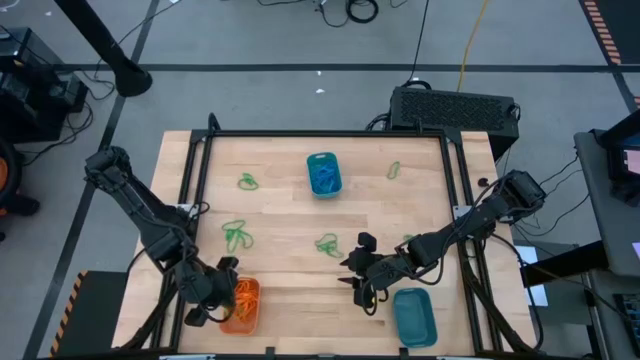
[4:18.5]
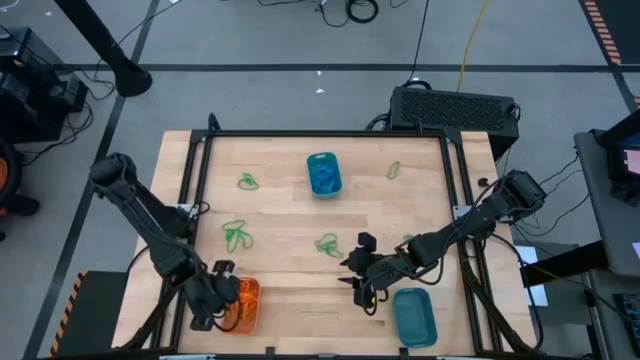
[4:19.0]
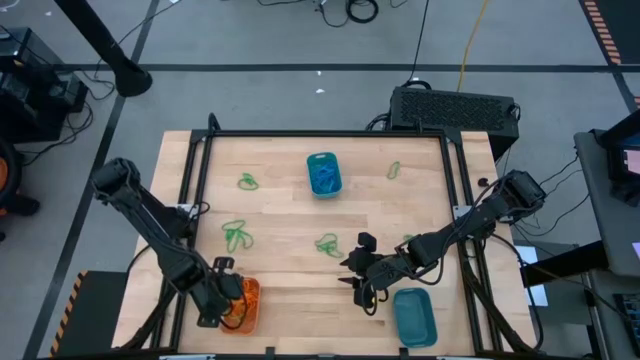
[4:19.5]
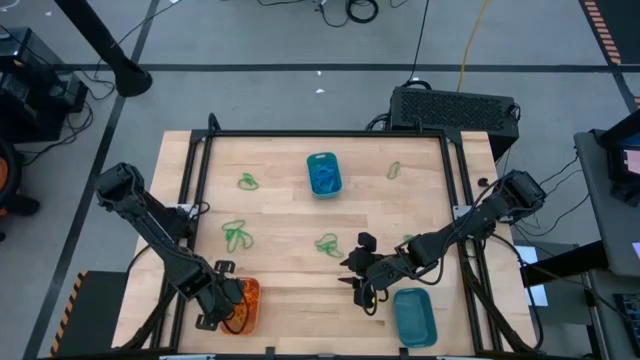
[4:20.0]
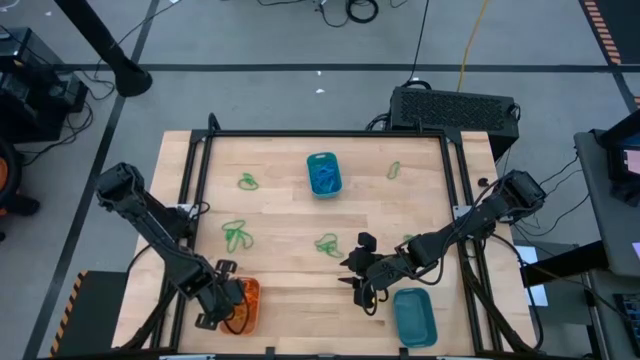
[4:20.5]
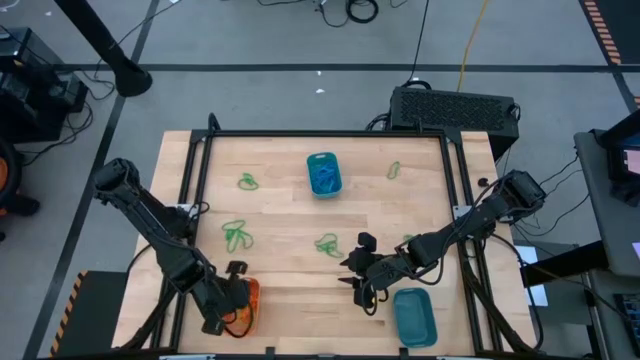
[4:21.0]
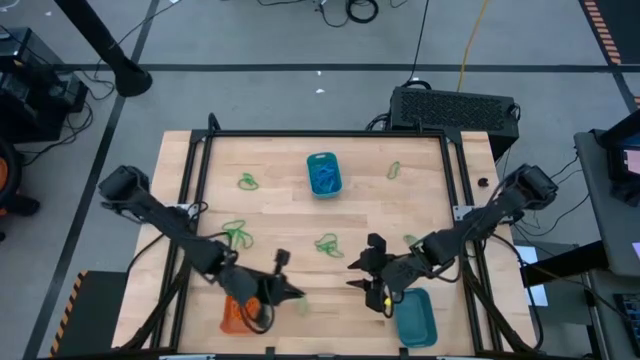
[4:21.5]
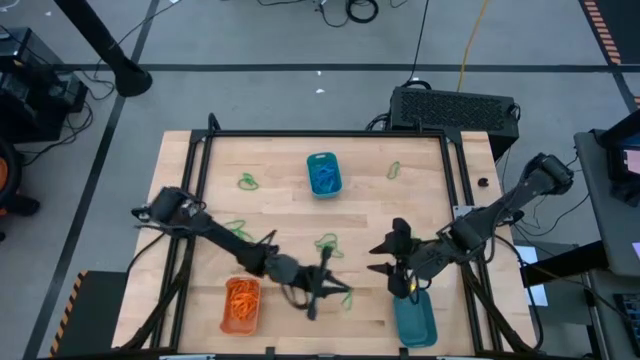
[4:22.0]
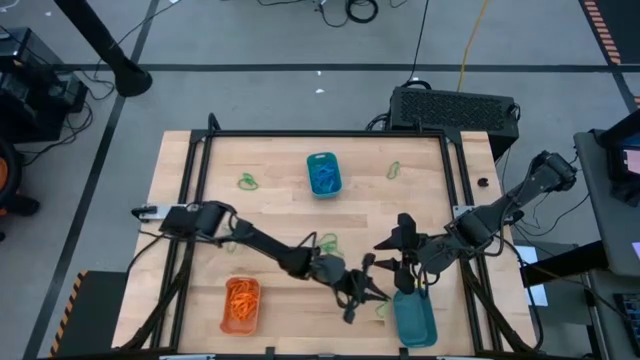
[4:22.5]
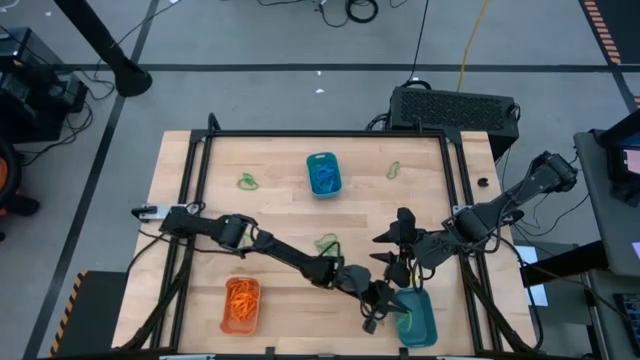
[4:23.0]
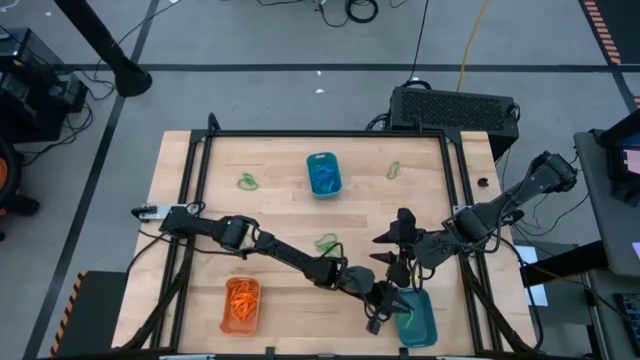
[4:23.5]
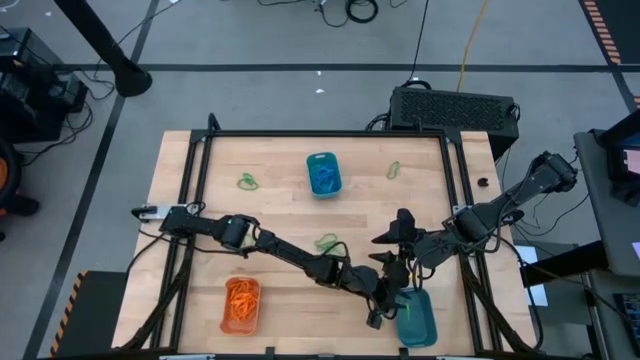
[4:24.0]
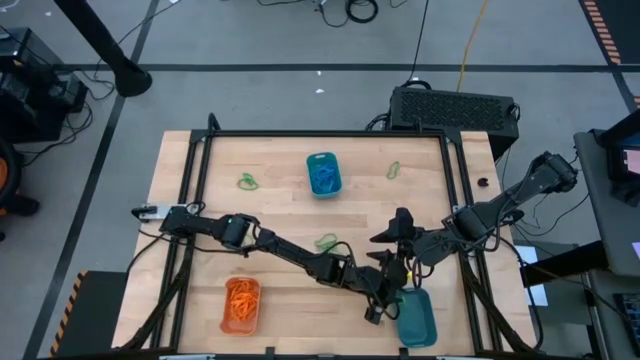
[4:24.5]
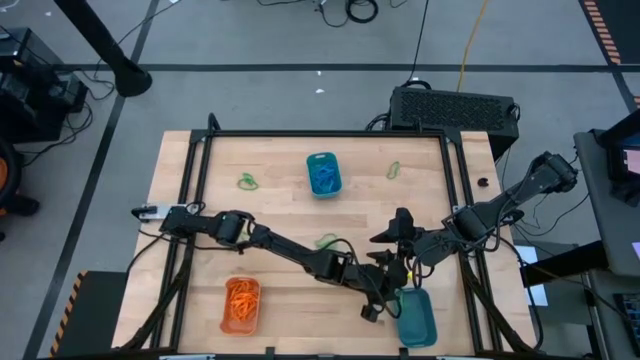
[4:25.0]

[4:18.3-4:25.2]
Task: Sort rubber bands into baskets
Move the green rubber band into the bottom bin

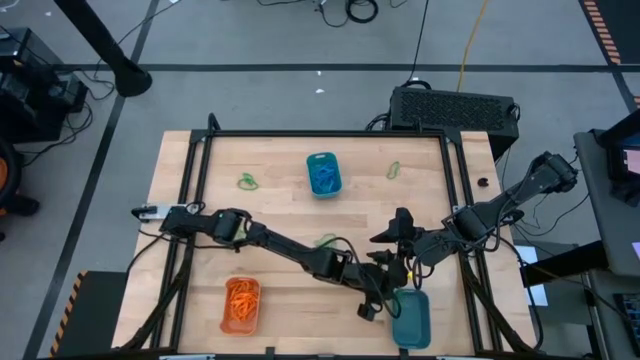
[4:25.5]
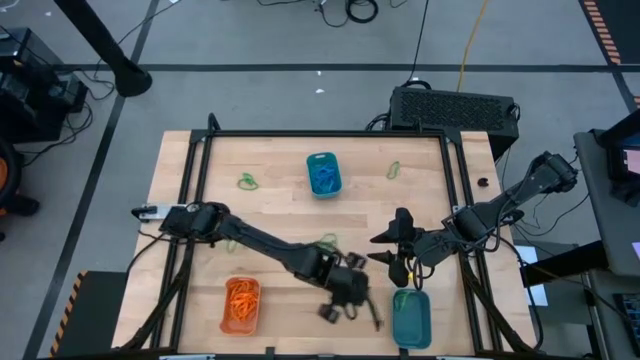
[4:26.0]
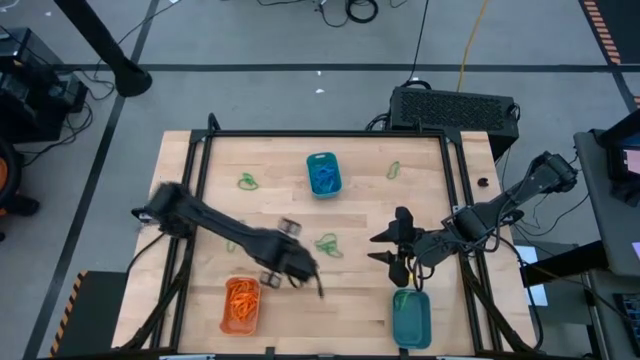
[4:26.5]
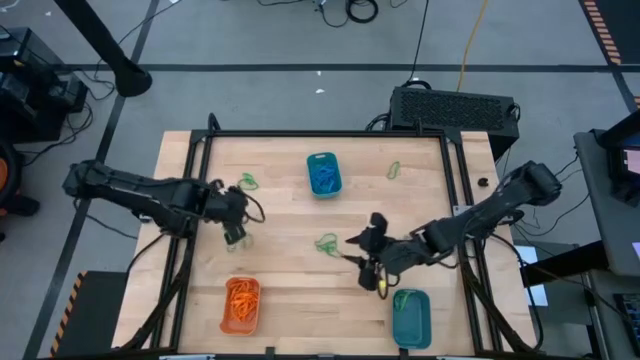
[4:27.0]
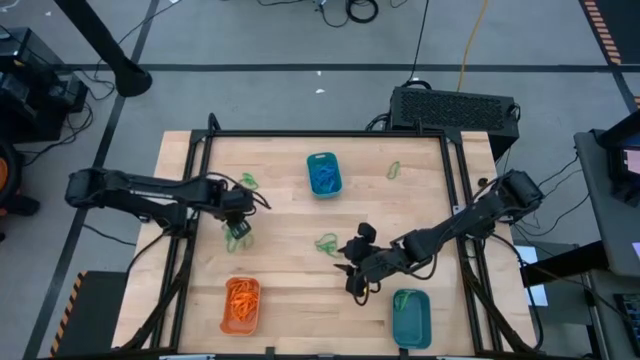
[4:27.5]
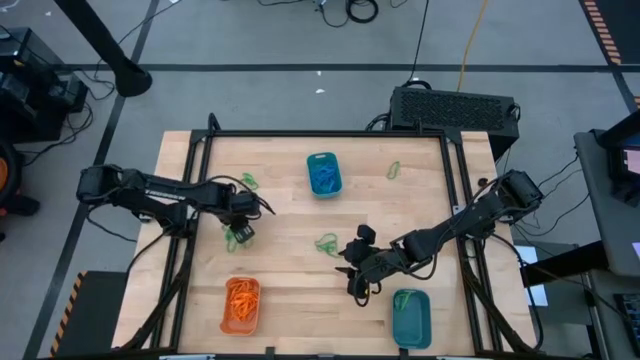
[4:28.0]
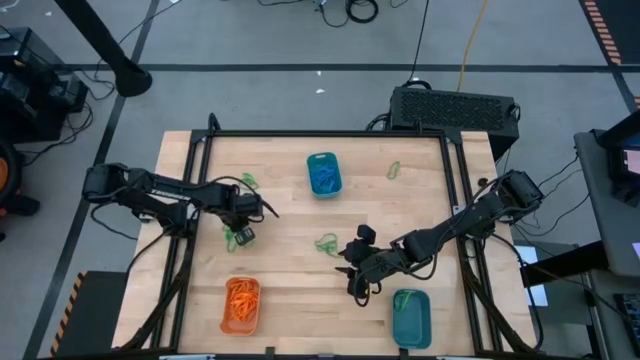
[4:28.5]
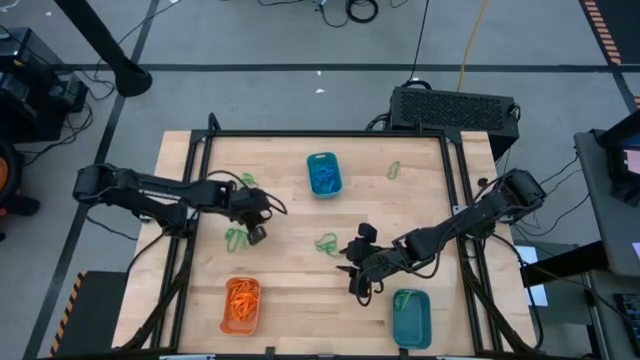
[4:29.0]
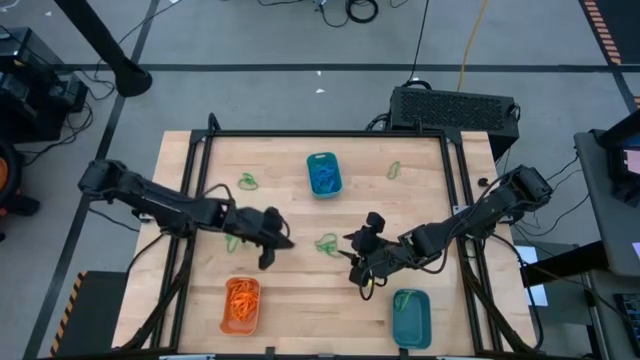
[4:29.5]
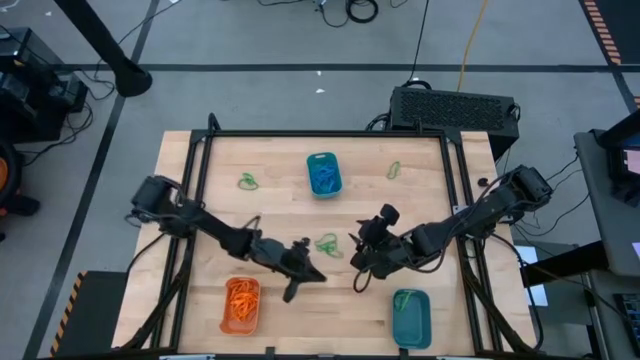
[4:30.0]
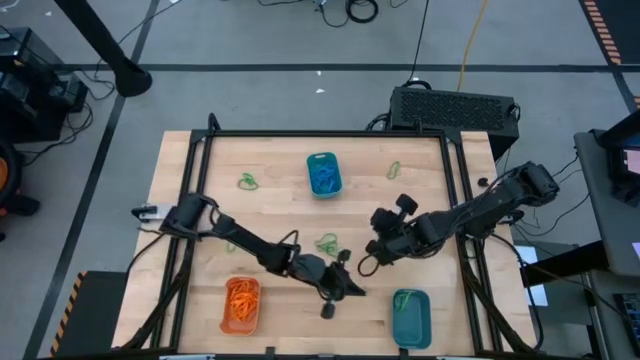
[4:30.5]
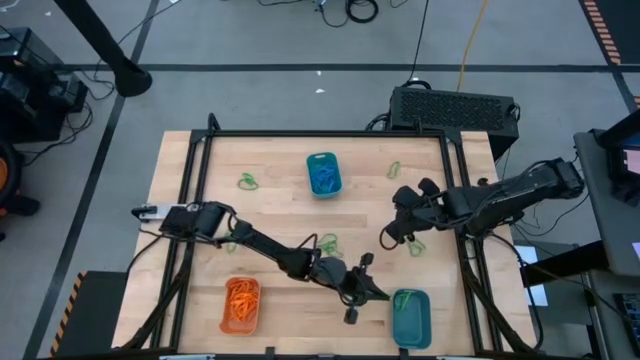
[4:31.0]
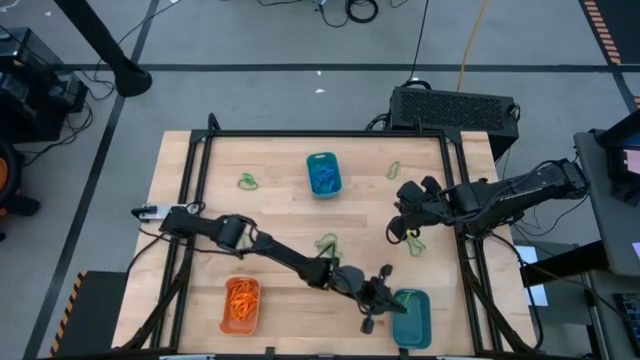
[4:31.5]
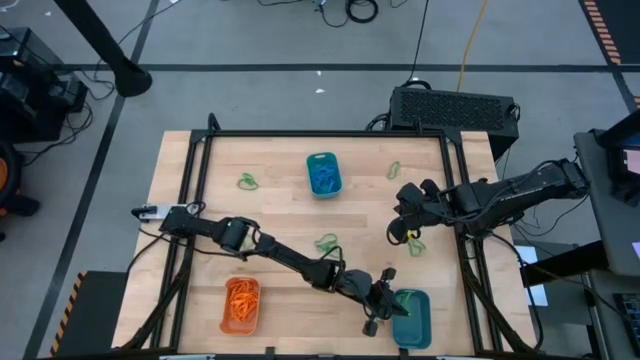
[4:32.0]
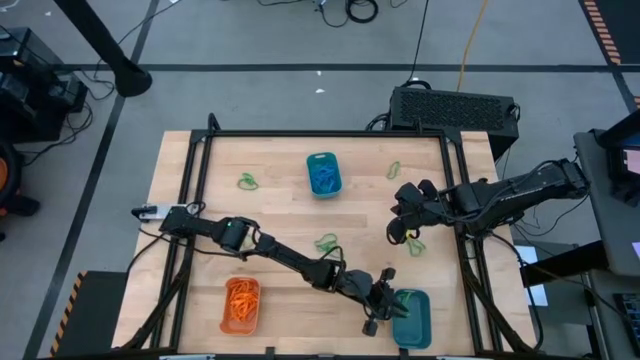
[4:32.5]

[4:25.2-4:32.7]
Put the green rubber band into the bottom bin

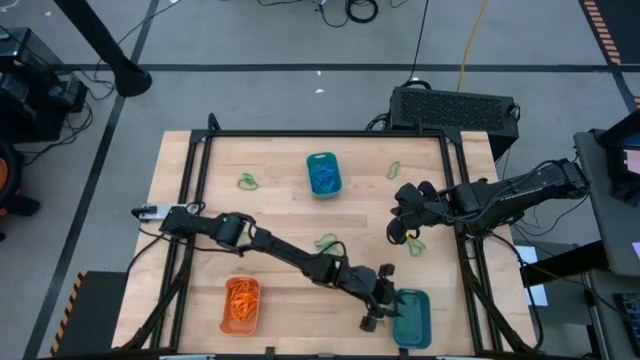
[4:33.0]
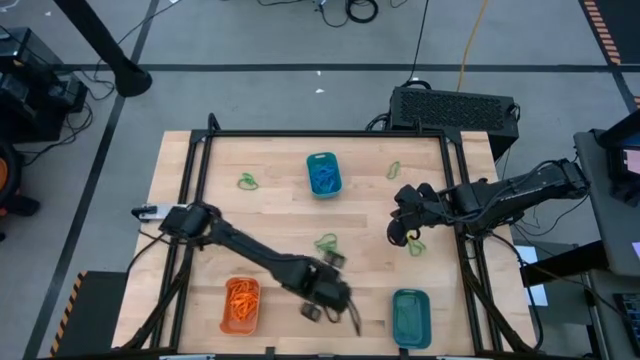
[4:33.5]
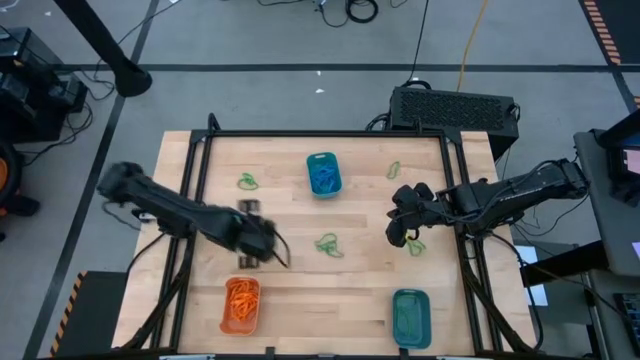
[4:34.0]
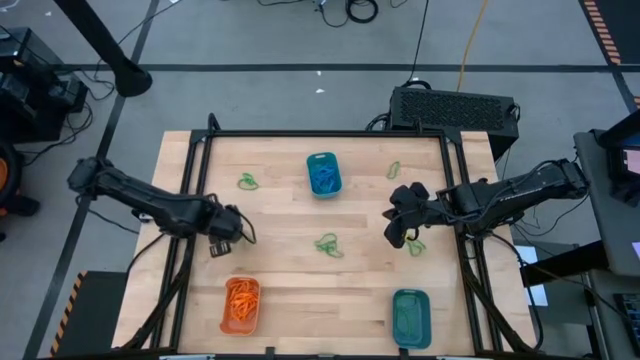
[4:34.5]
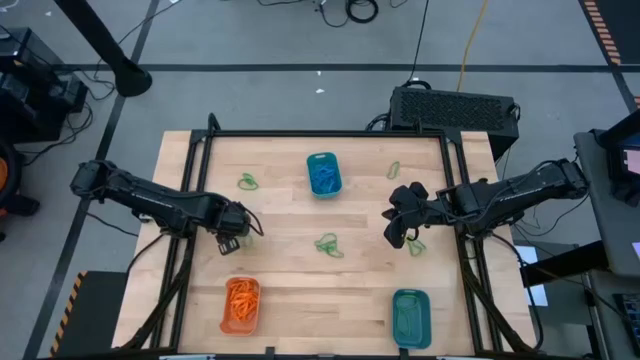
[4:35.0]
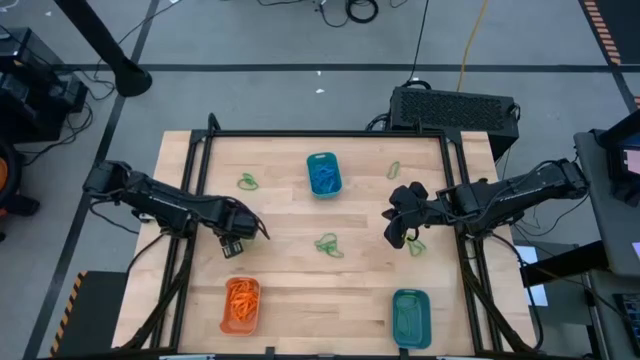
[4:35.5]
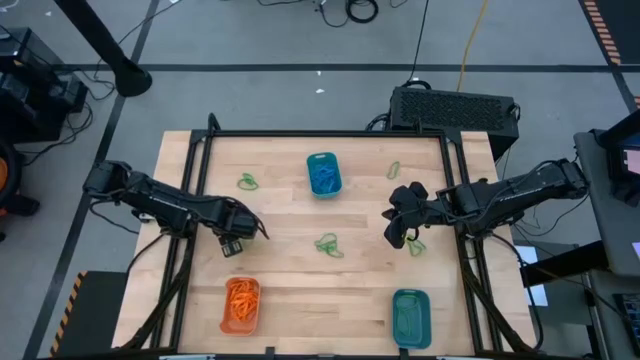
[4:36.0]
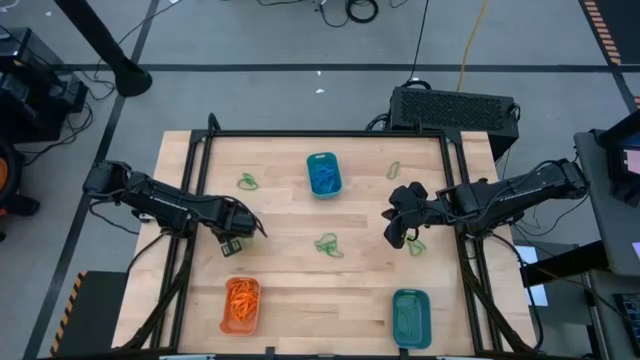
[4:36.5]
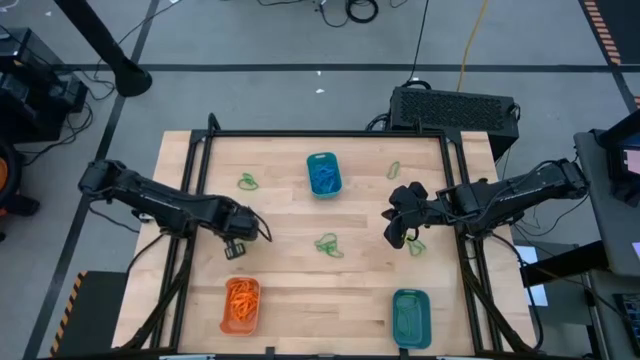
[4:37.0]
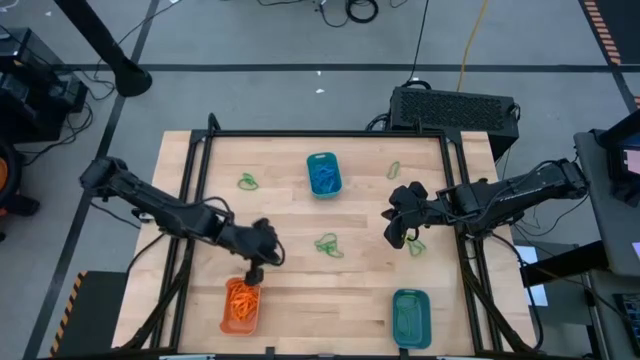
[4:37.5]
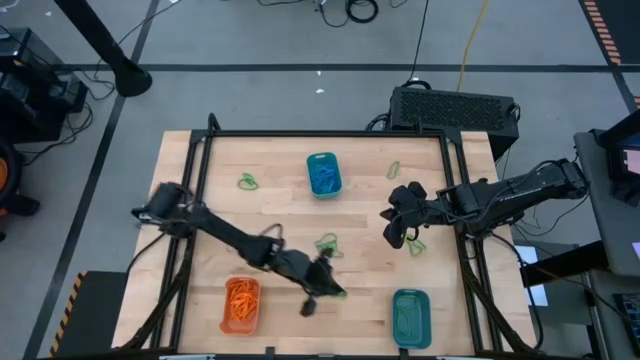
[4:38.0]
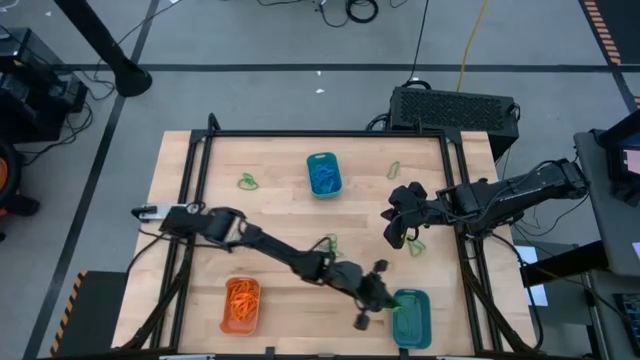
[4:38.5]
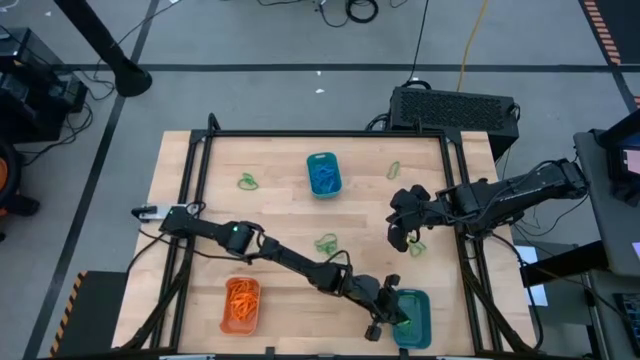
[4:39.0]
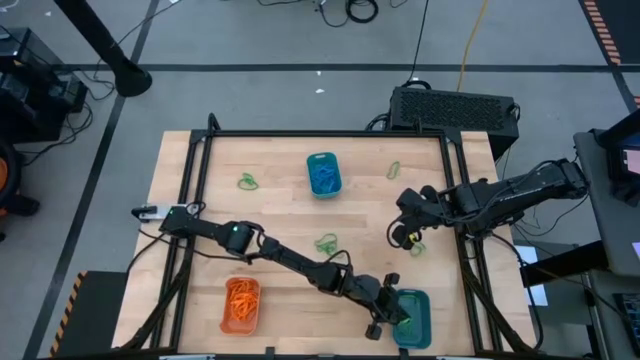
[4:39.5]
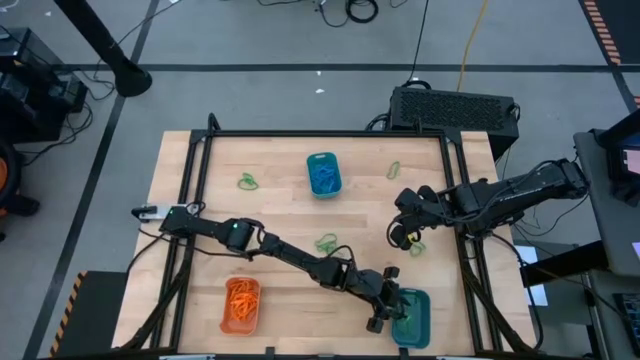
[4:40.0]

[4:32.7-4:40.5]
Put the green rubber band into the bottom bin
